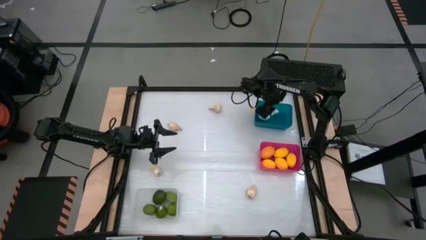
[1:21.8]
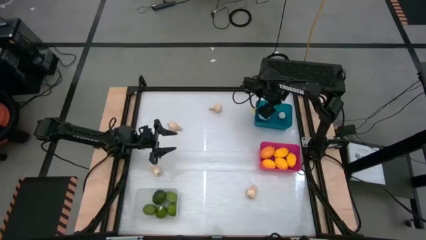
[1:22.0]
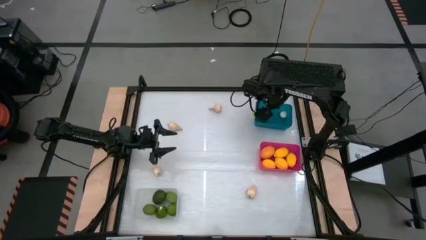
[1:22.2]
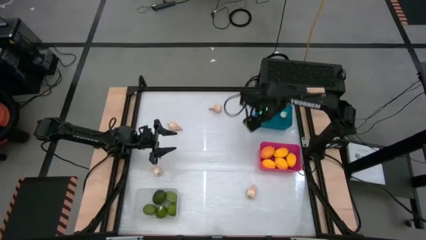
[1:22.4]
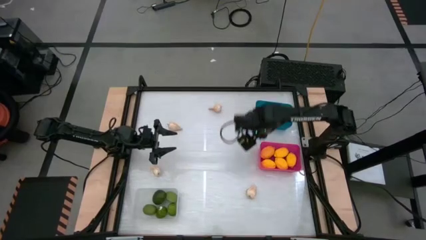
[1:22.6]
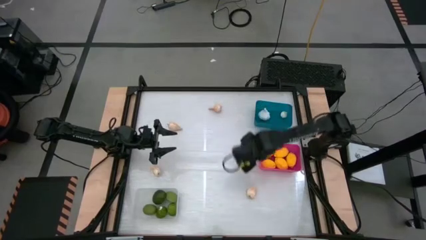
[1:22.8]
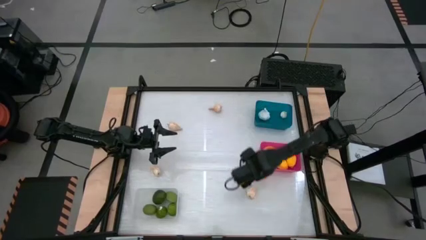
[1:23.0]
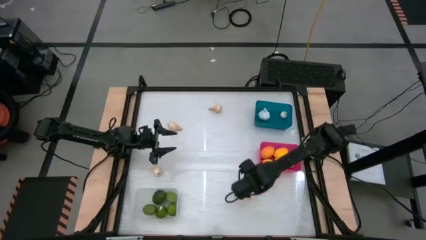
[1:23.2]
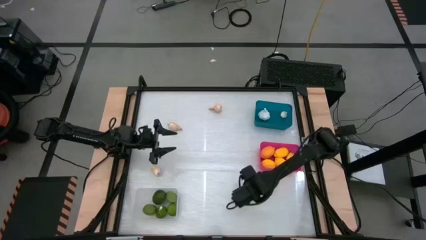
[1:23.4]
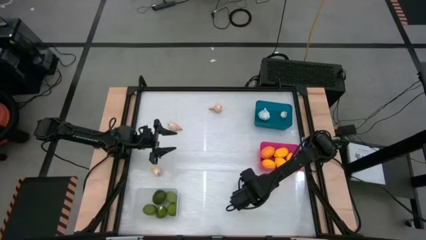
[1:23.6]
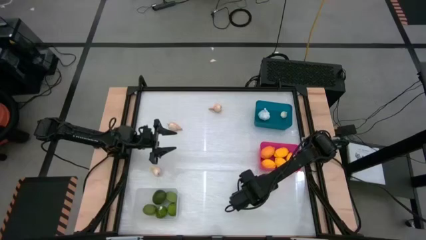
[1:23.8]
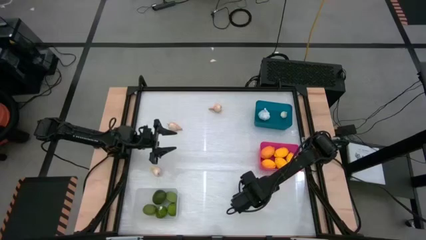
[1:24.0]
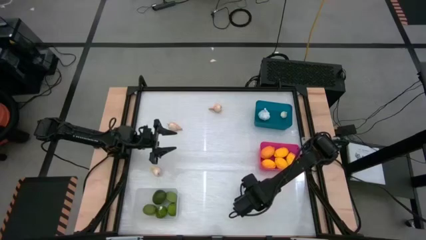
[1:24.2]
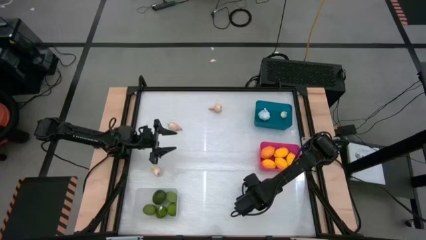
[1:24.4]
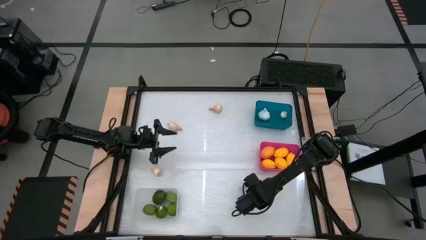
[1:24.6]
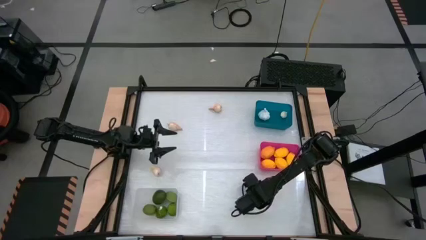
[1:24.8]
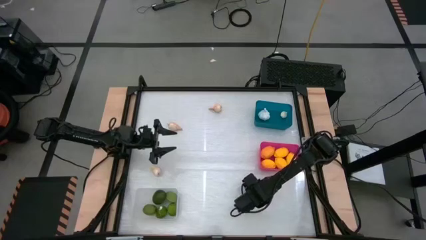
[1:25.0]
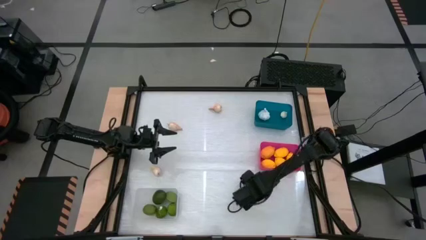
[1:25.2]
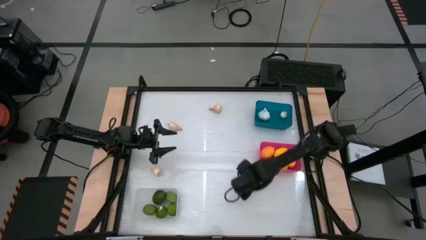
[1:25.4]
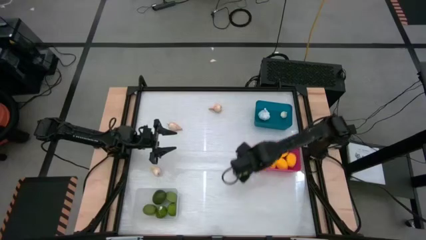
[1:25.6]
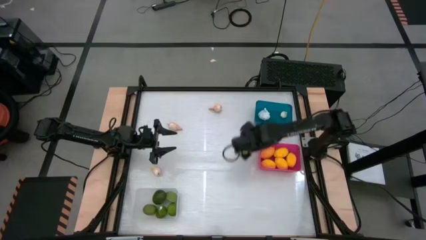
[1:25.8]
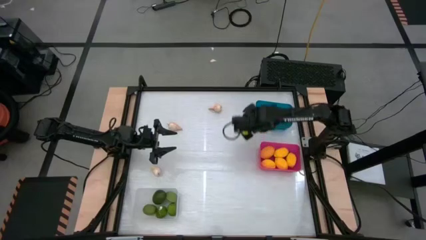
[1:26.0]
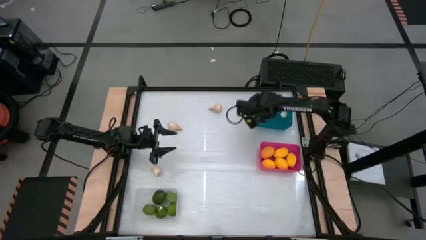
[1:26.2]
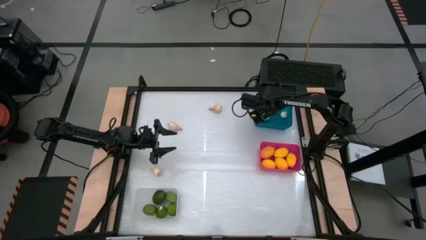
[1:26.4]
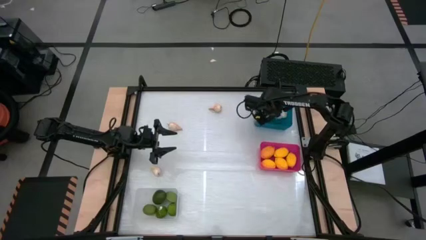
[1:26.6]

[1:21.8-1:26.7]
Task: Sort produce into baskets
Put the white garlic into the blue bin

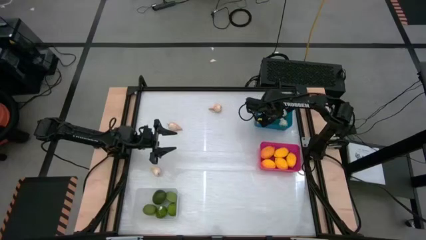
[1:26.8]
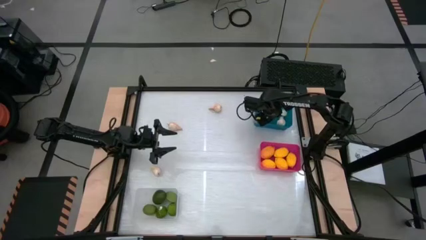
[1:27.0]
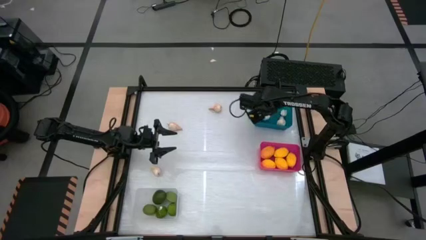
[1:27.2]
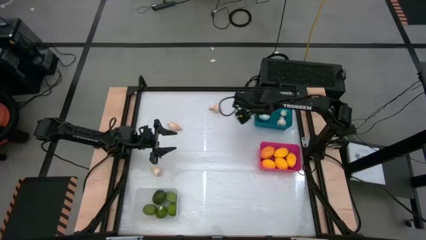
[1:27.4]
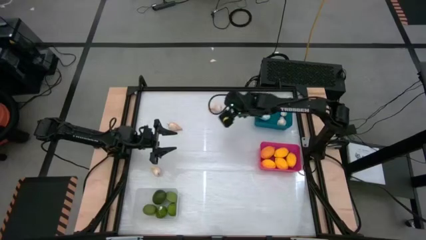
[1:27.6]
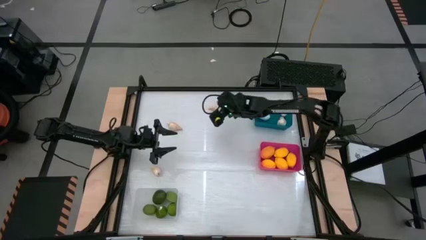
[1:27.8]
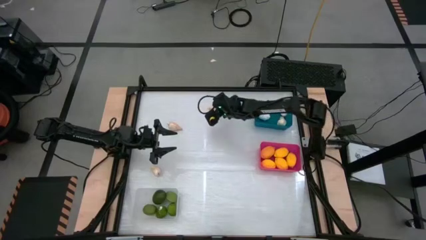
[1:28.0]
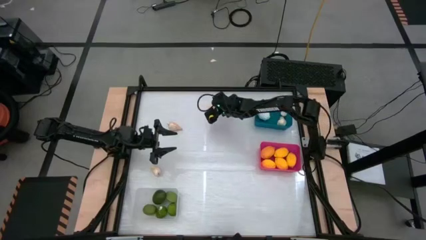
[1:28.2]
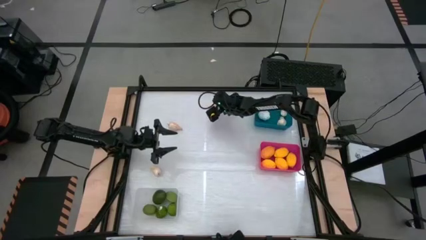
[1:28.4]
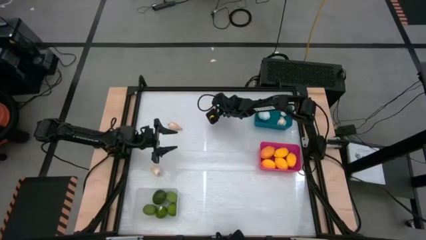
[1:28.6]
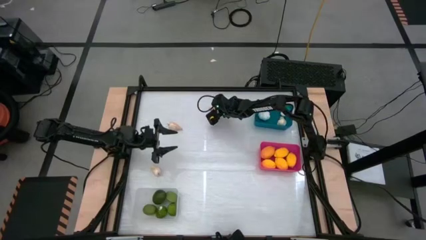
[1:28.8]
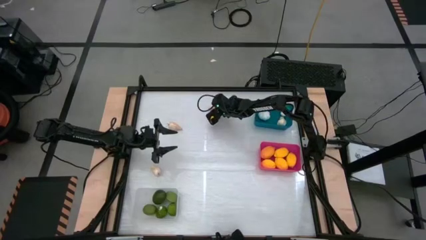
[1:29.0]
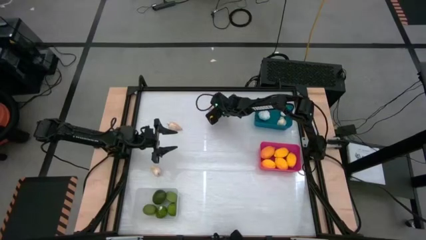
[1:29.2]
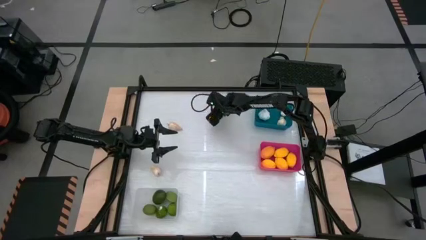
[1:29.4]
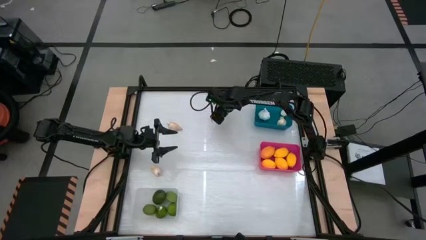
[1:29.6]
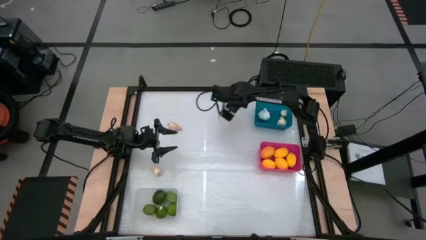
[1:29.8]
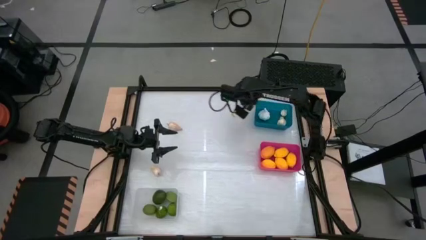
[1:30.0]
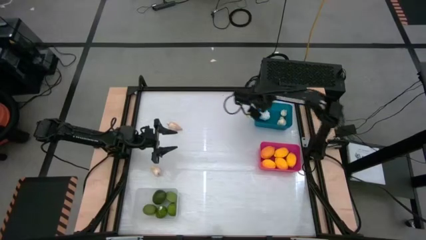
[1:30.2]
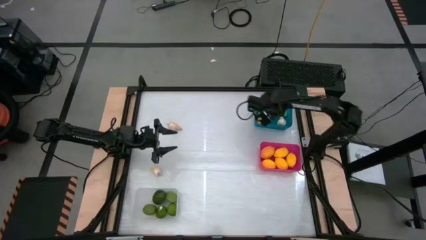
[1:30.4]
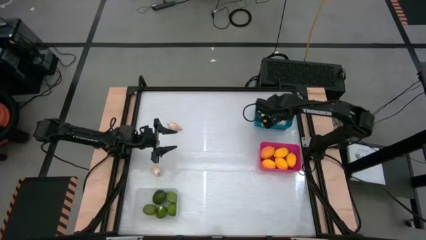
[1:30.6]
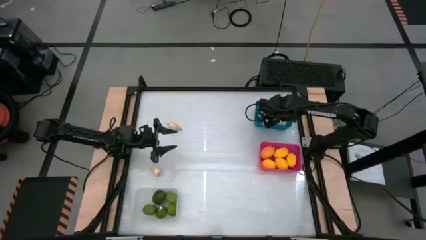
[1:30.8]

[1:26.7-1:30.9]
Put the white garlic into the blue bin

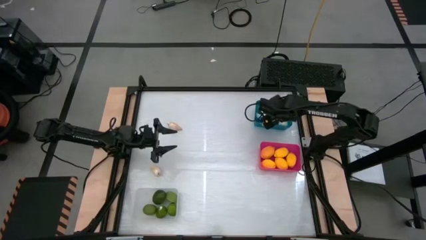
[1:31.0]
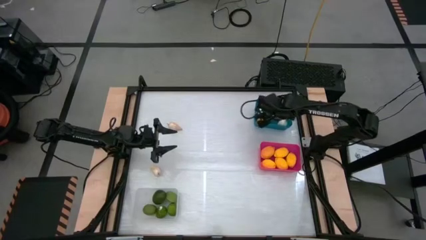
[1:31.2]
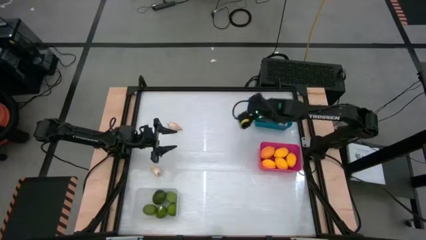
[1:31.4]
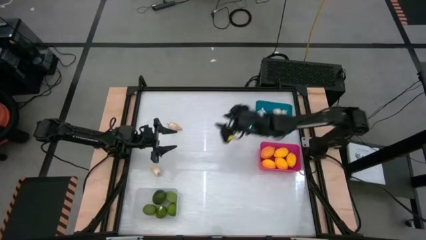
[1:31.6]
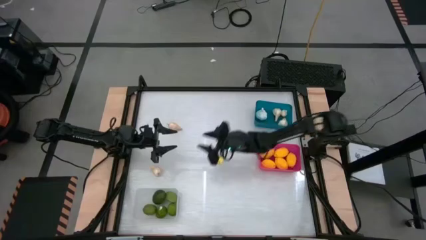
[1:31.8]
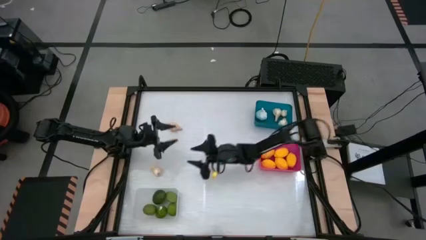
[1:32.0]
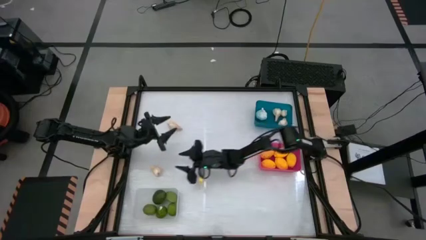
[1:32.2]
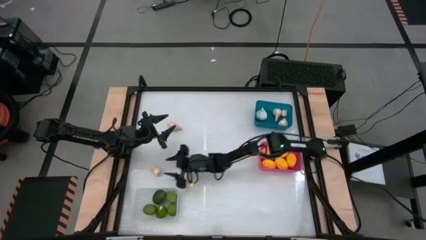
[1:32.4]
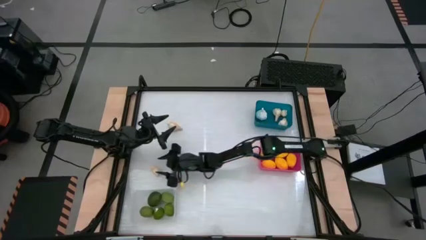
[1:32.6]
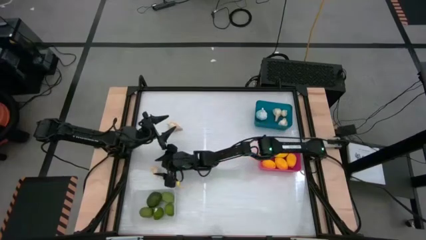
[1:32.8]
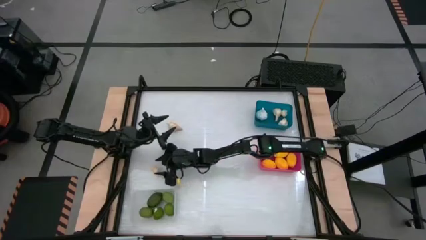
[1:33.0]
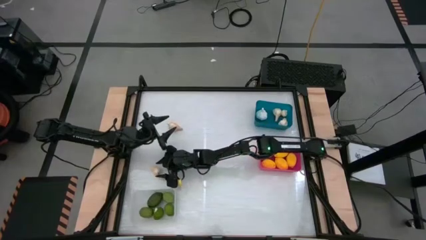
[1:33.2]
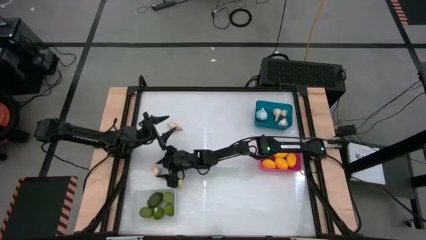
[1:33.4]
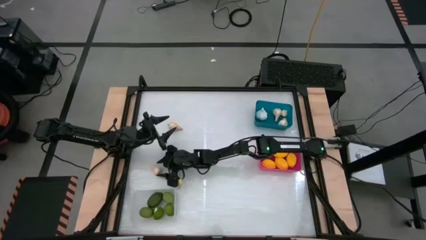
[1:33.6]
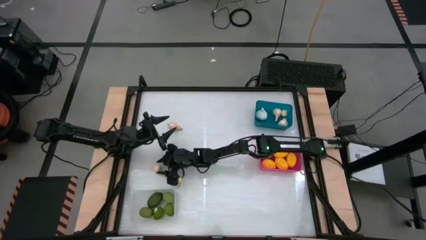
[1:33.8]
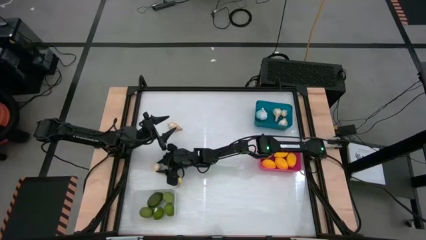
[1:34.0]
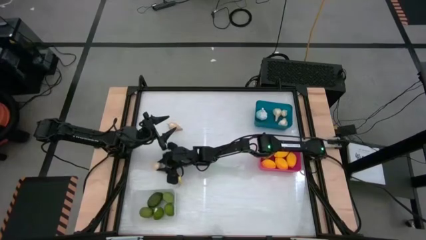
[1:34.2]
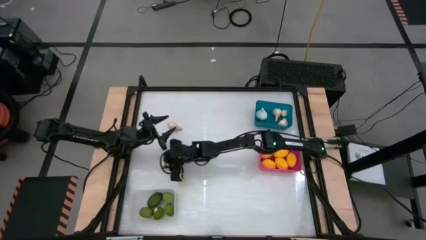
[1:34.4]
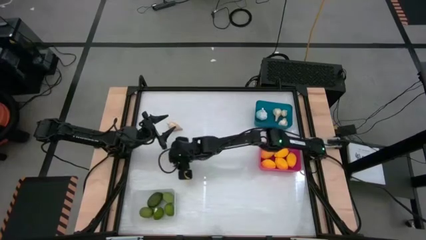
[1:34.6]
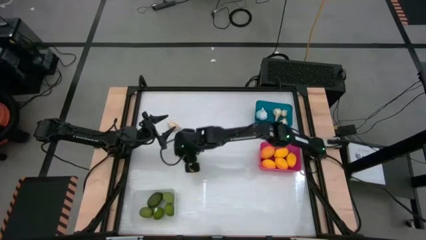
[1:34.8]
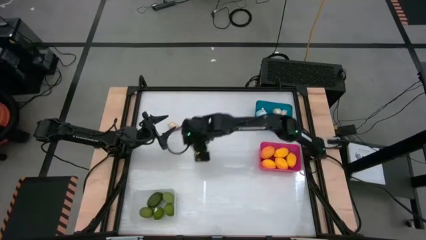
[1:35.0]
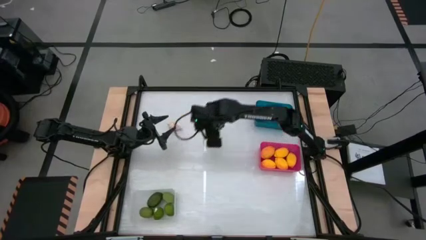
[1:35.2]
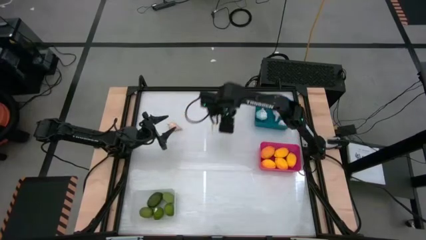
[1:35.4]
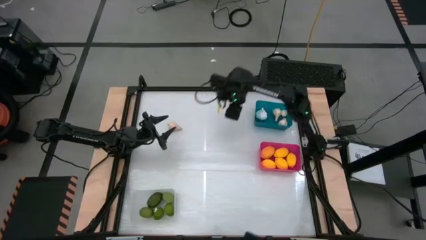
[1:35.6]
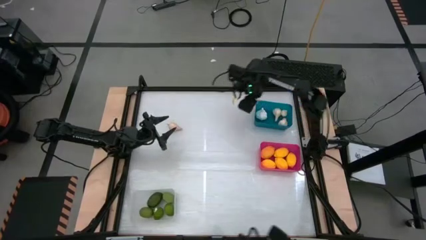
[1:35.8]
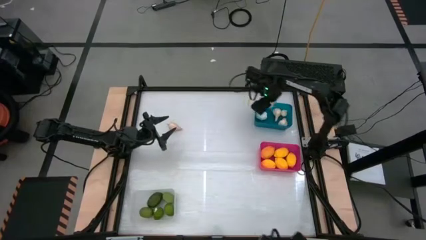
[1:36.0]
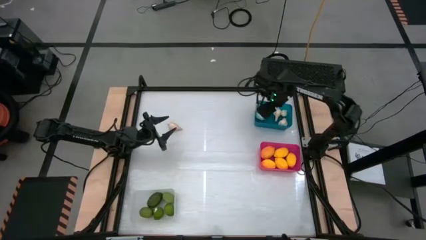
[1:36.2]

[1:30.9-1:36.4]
Put the white garlic into the blue bin

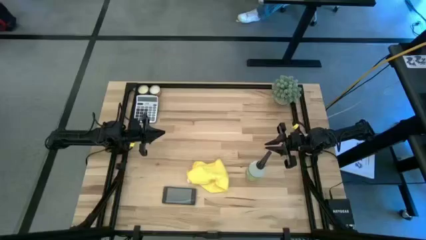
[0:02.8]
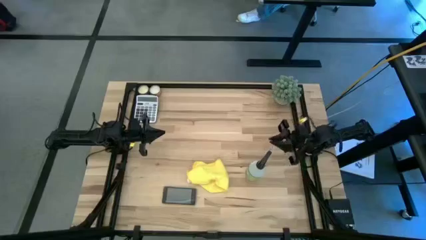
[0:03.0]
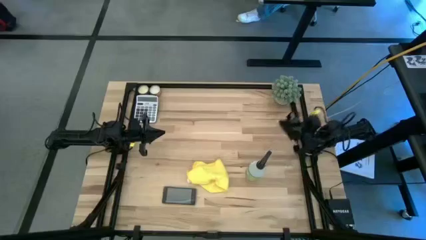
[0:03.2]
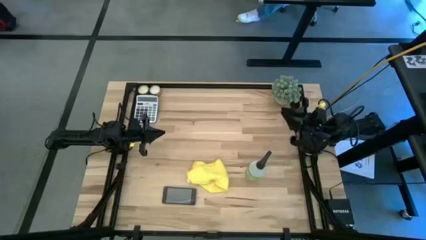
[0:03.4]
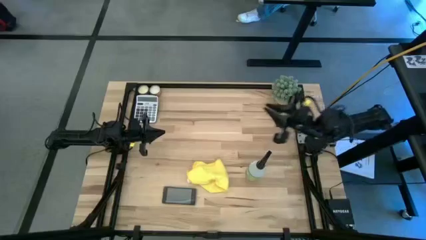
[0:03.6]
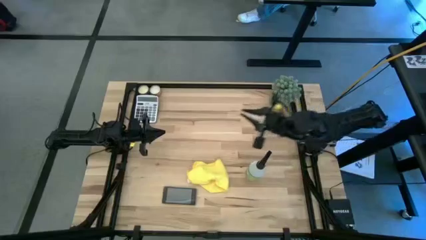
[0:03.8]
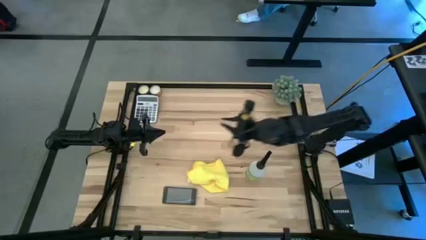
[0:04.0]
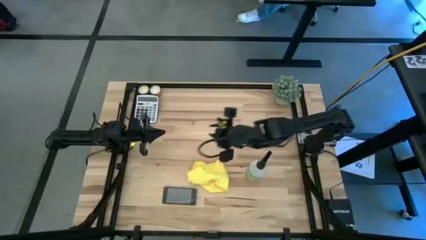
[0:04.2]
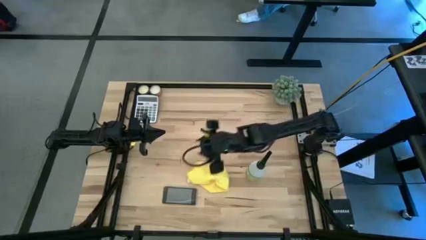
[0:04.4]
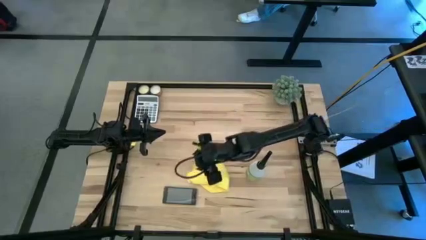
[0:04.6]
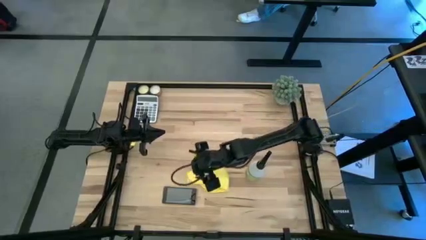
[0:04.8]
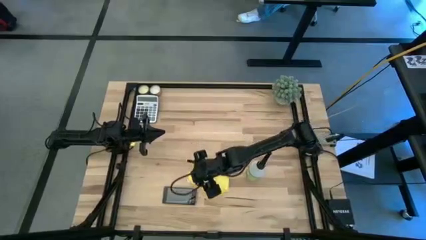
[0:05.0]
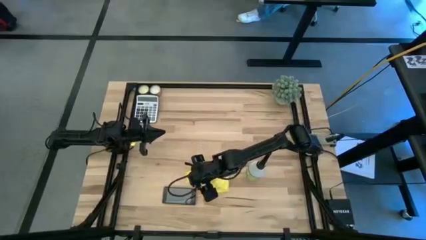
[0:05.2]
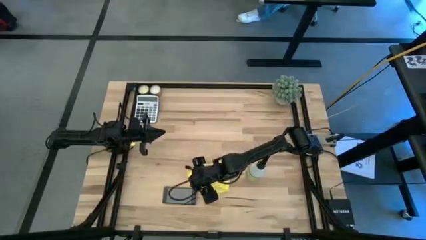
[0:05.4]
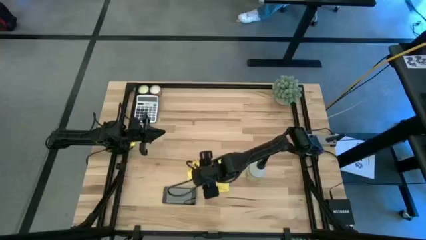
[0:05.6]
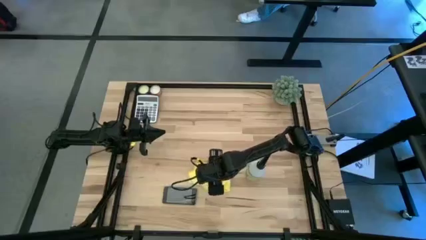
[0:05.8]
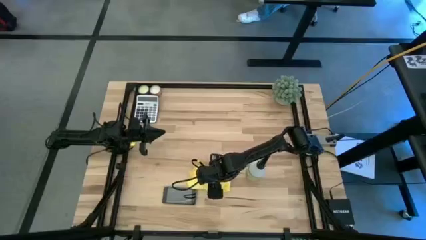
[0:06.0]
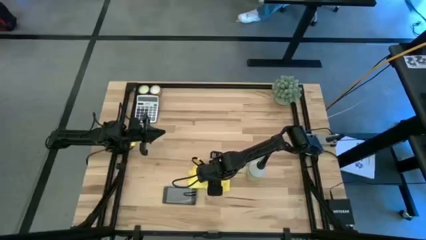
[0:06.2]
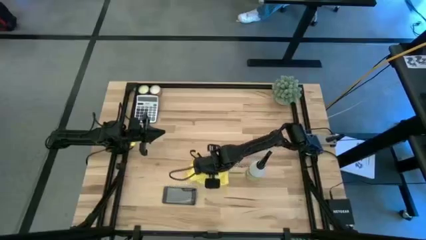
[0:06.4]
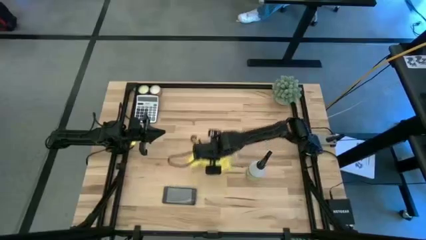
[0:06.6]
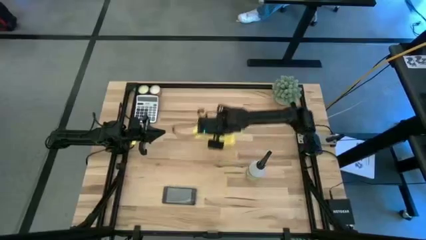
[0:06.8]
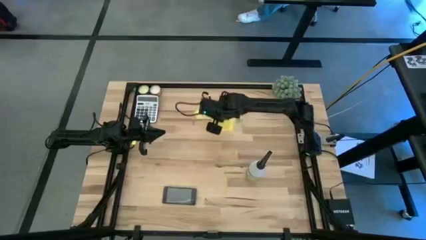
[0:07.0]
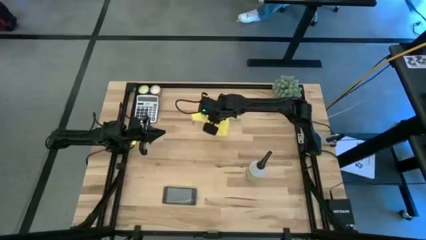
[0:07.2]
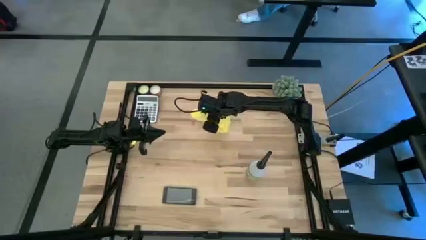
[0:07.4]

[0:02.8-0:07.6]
Task: Apply microfiber cloth
Move the yellow microfiber towel to the top middle of the table
